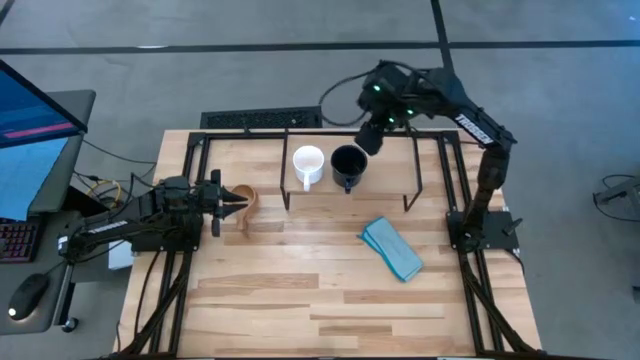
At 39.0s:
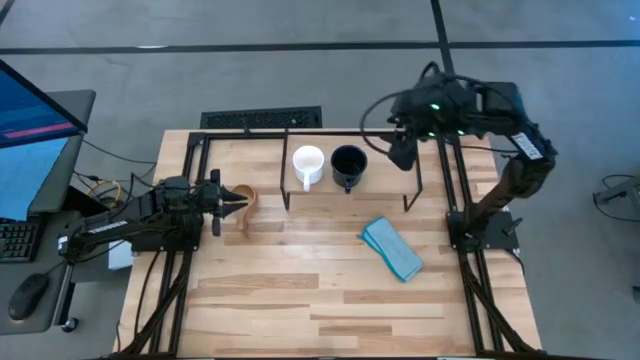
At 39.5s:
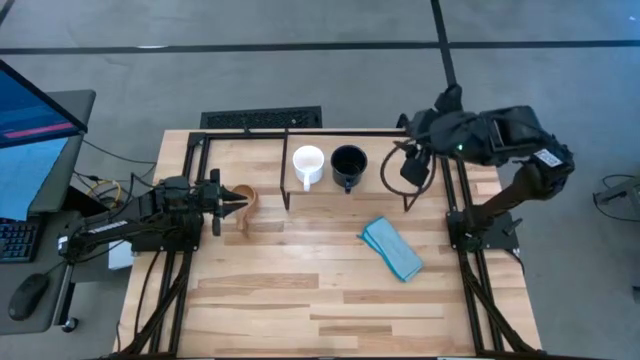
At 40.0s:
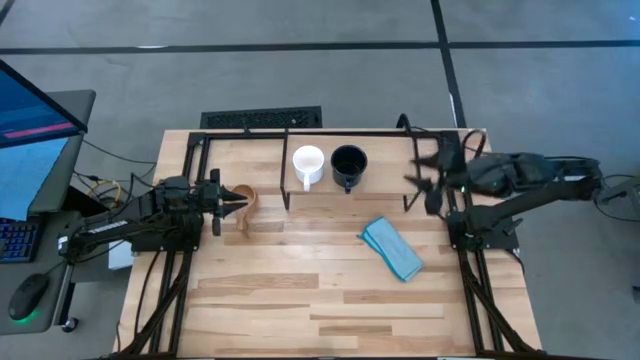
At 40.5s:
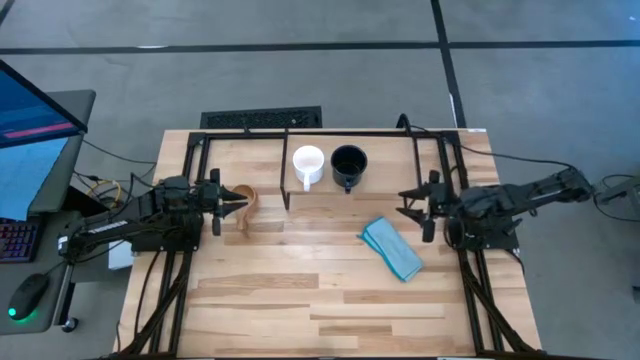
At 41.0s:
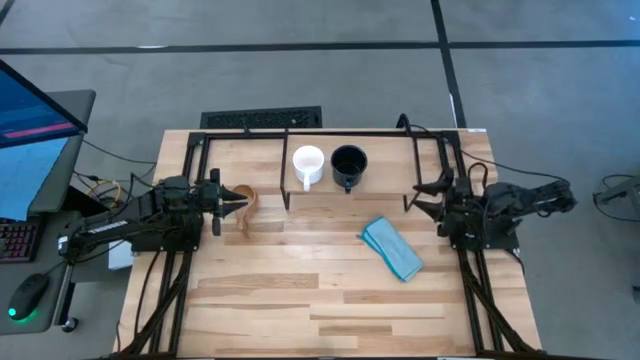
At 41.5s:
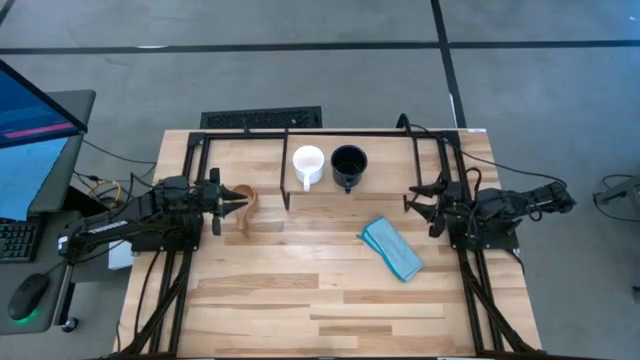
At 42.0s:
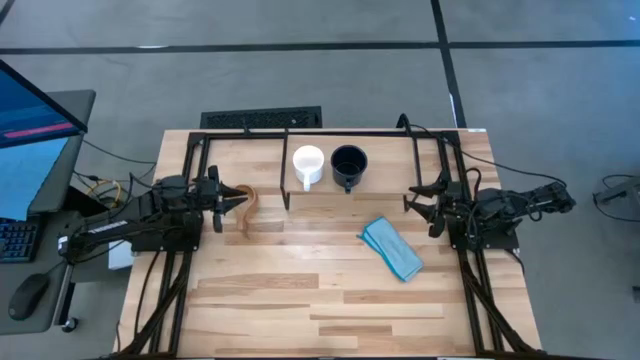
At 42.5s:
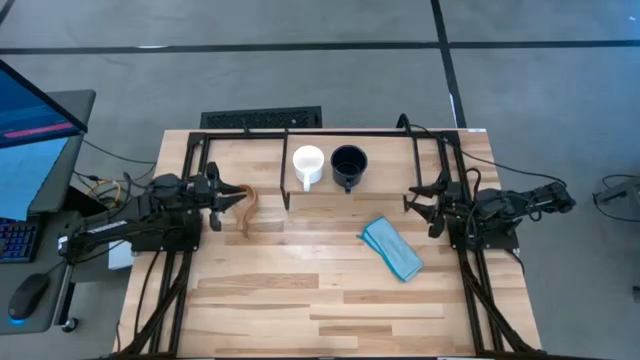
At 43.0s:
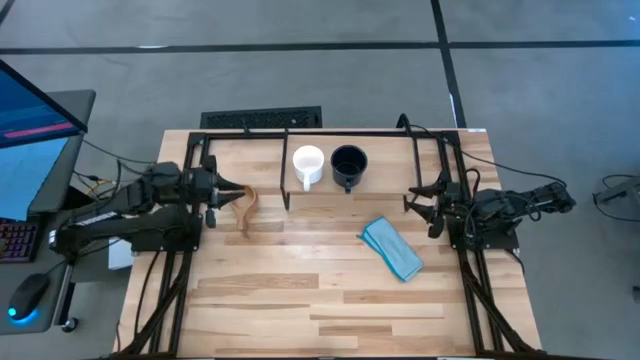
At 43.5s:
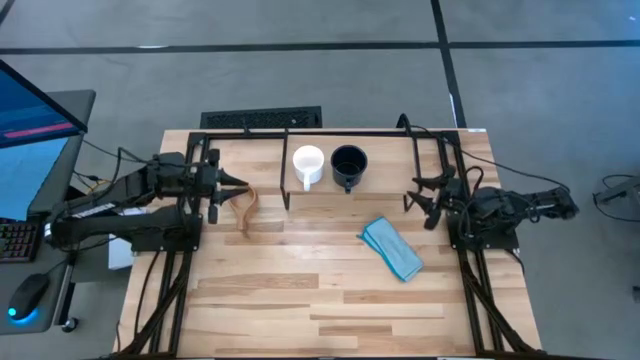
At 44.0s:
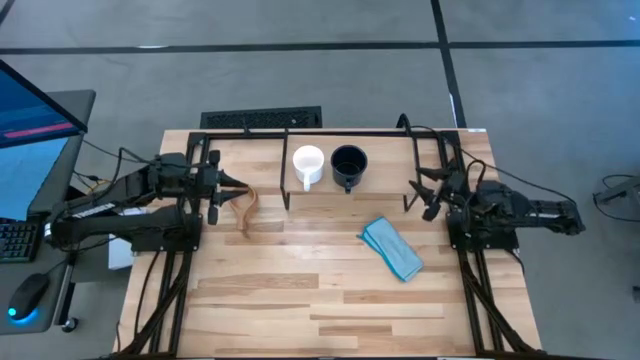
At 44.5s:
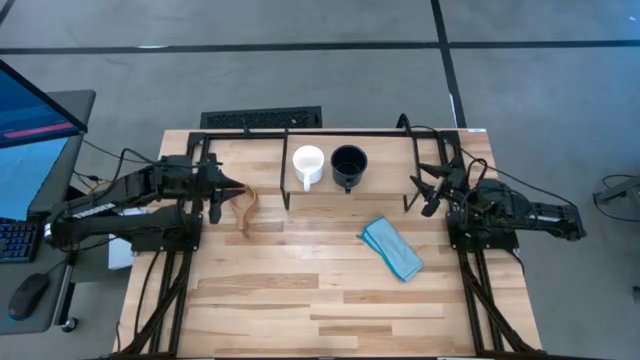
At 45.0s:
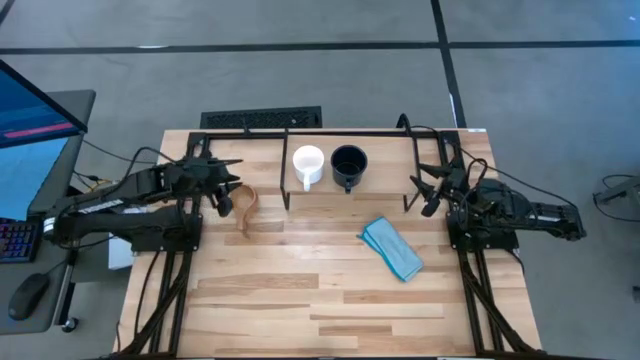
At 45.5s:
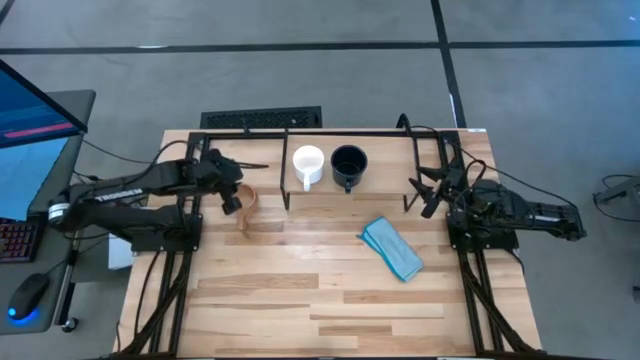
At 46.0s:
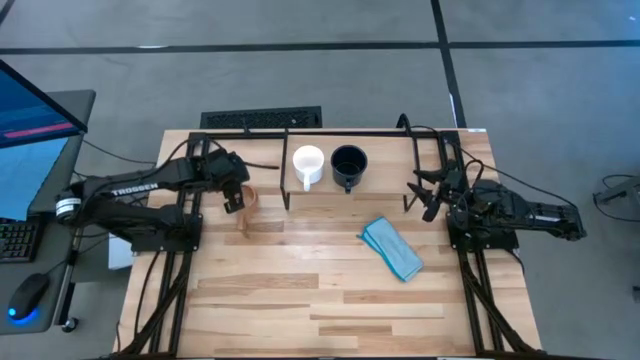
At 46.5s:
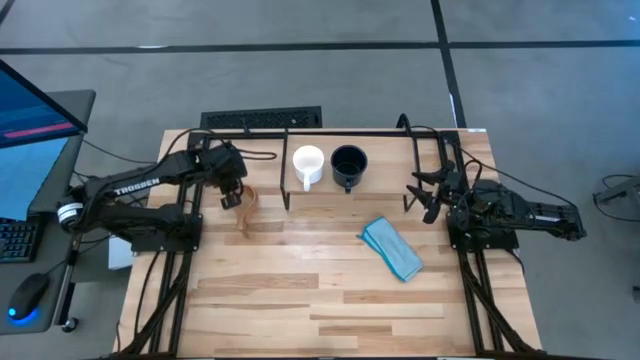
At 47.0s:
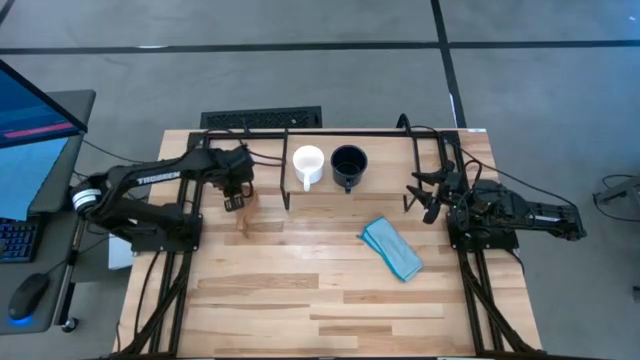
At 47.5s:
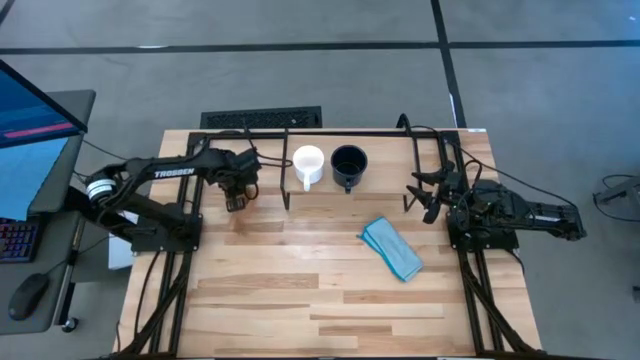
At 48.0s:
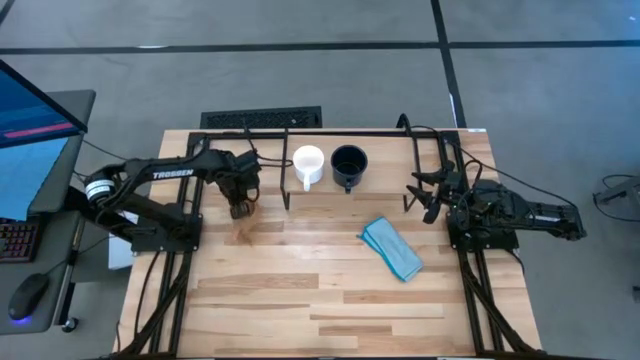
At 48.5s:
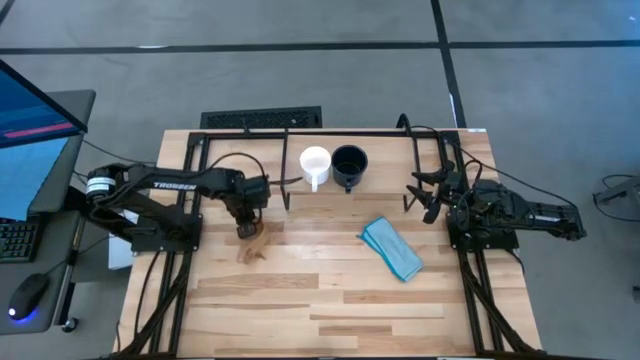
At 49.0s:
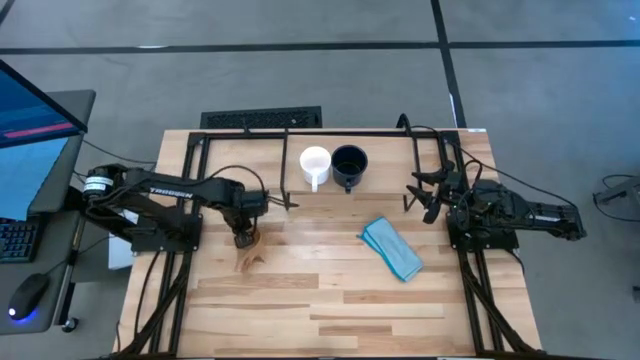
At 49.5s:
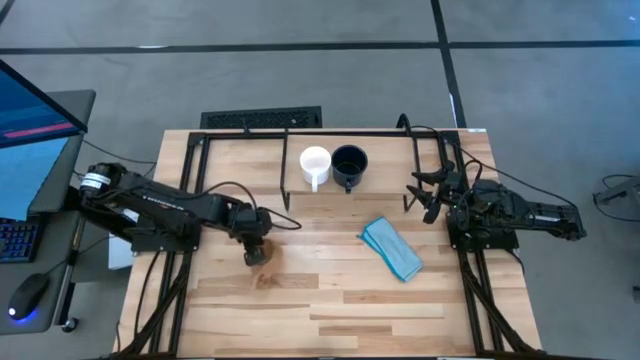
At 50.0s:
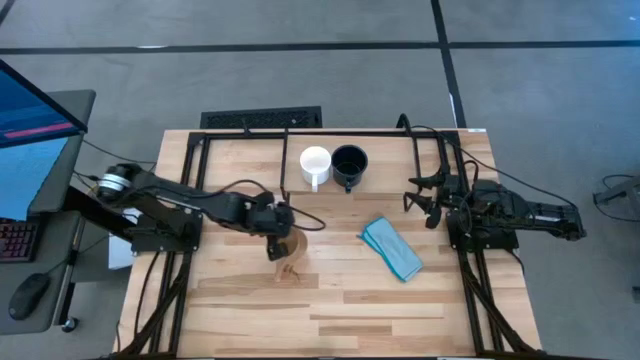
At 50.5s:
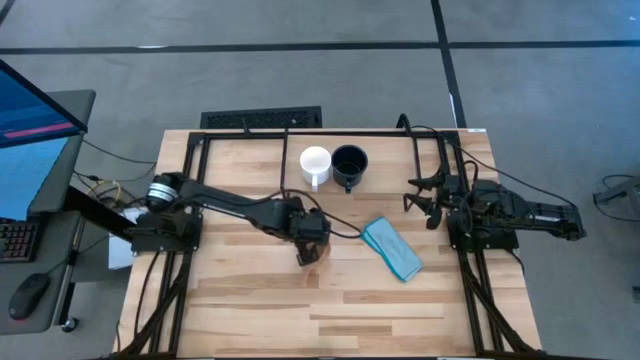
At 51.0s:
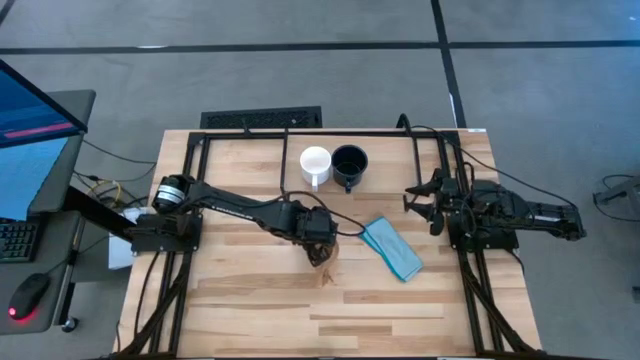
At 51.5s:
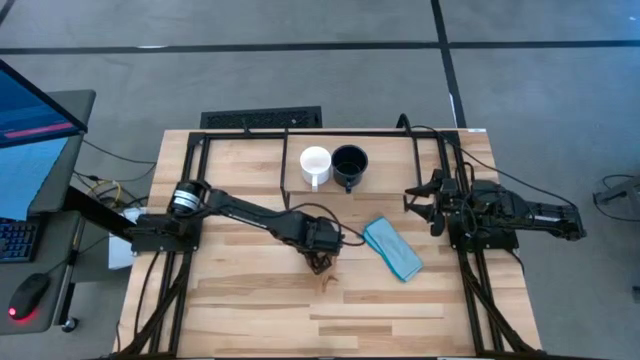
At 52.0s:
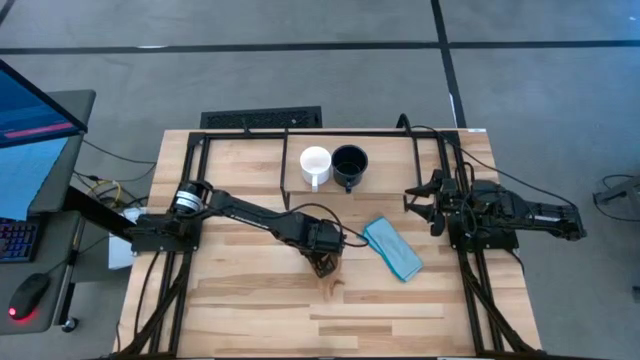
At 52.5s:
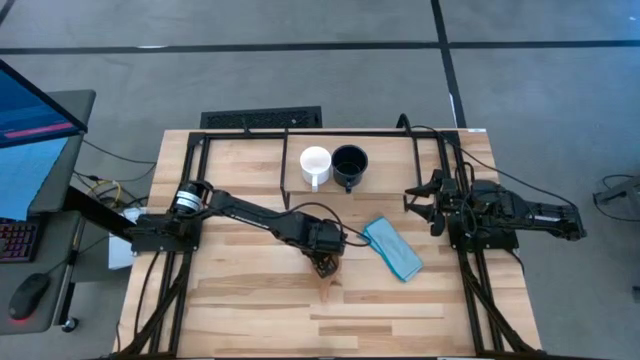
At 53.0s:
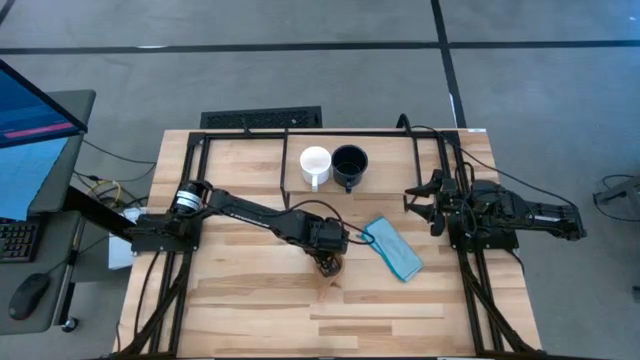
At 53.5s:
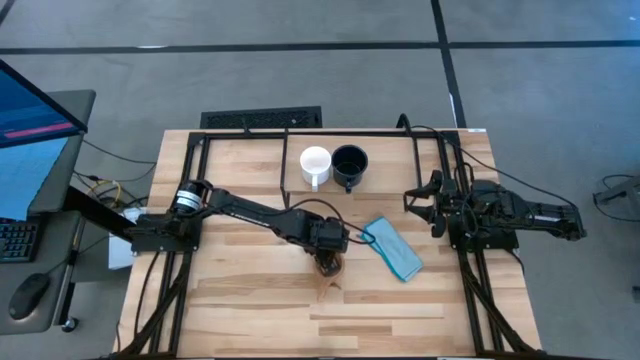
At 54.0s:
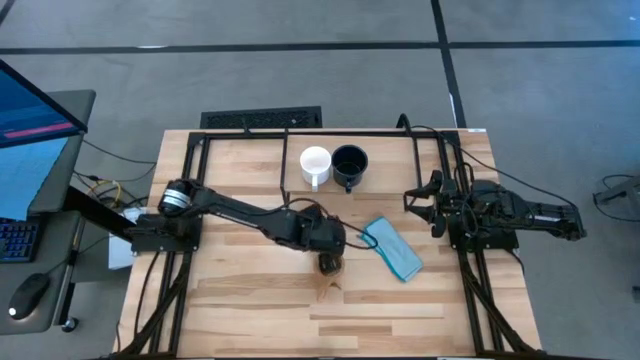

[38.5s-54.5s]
Task: Stack small to large cups/mugs on shelf
Put the brown wooden mug on the shelf

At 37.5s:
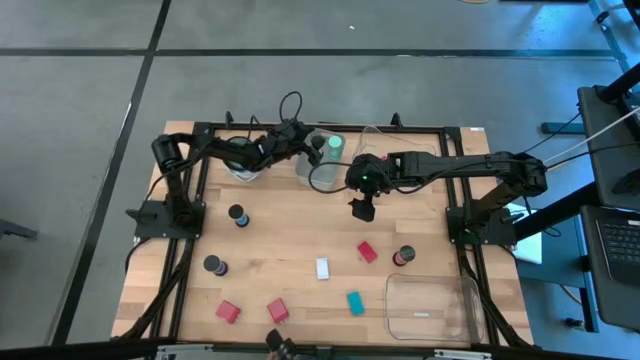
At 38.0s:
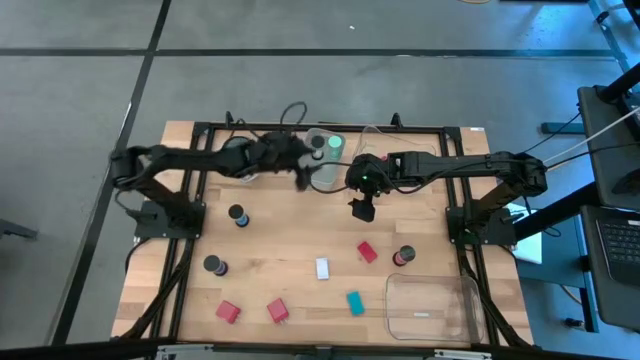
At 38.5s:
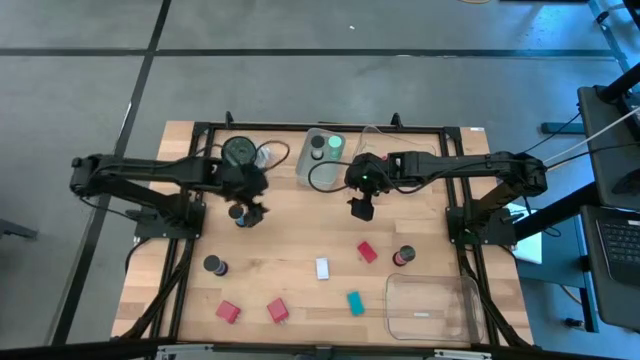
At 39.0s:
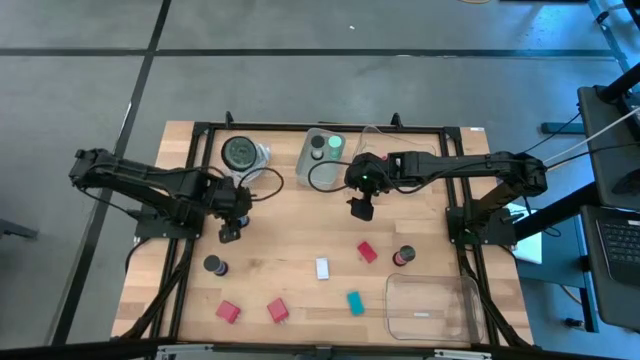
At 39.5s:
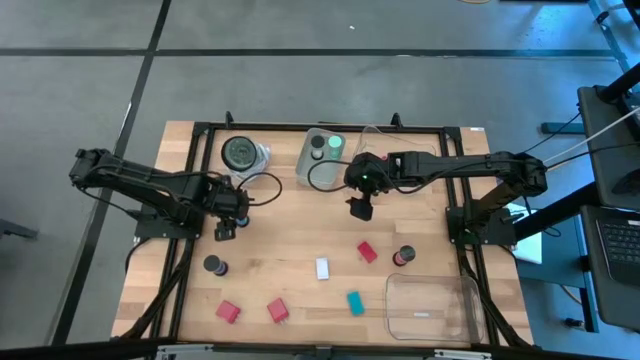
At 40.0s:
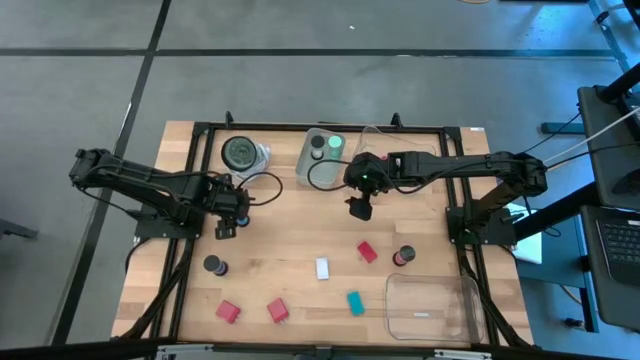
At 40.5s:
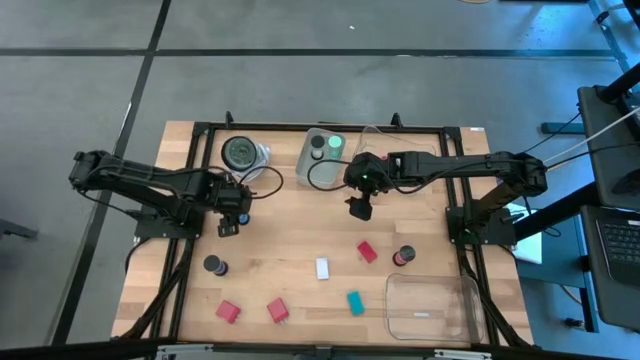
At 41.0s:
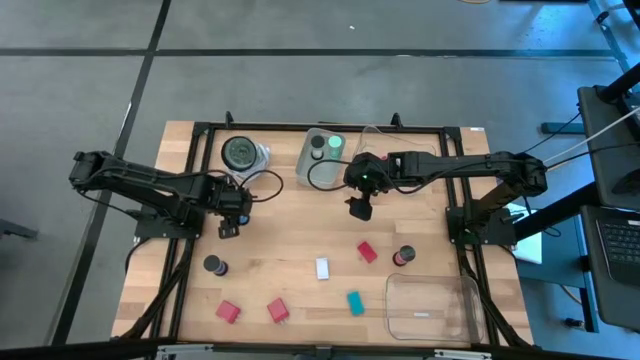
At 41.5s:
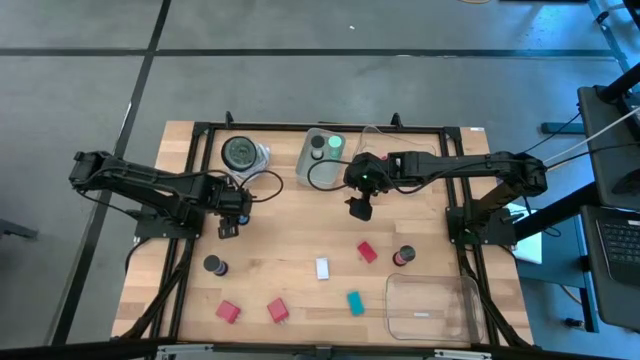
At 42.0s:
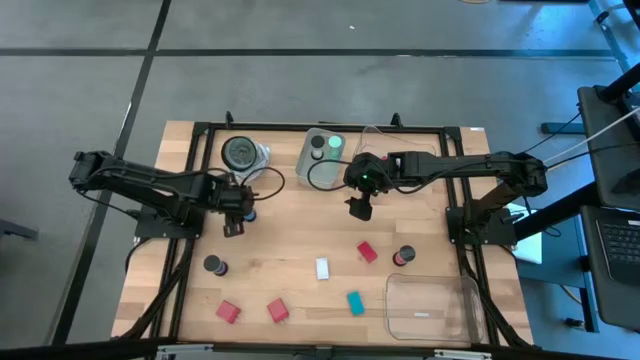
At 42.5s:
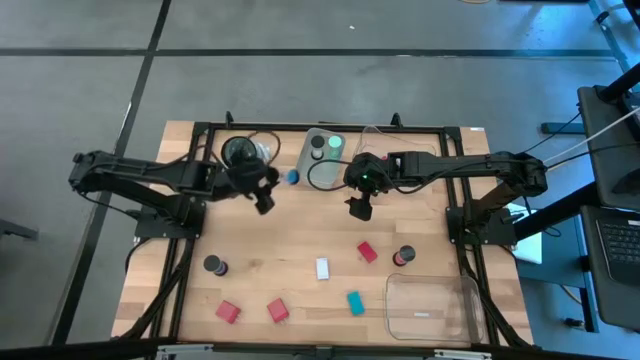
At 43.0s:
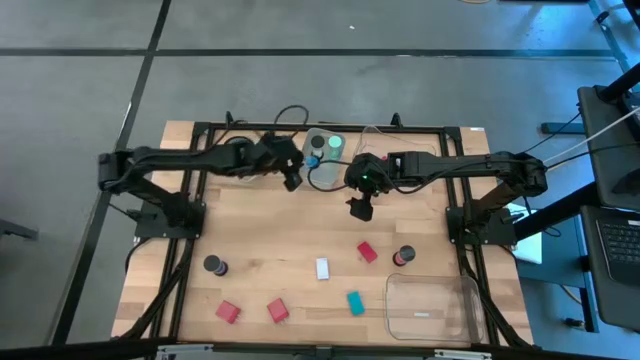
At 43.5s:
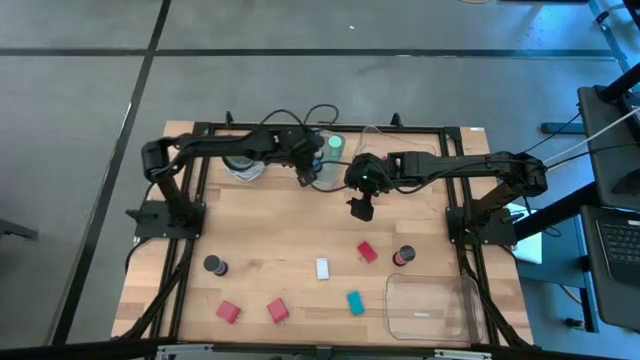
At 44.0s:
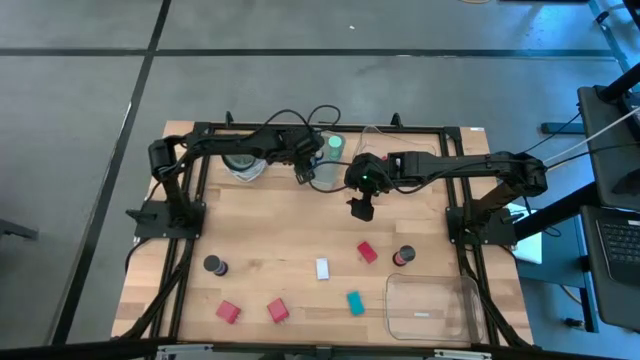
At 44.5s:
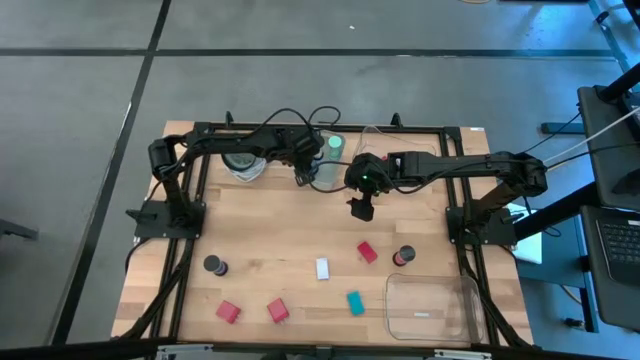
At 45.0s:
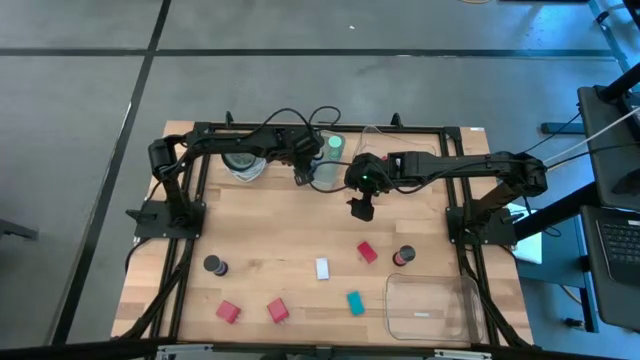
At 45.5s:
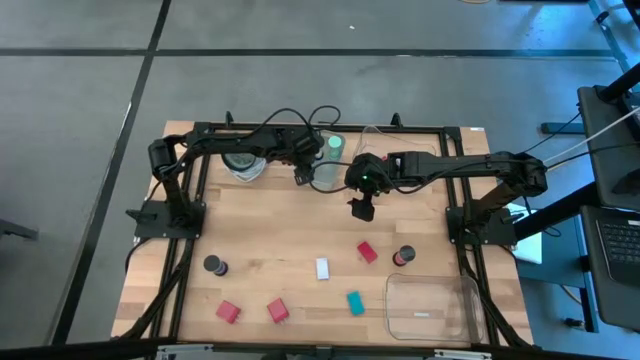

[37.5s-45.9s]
Task: Pick & Place Office items
Put the top blue hourglass into the gray bin
